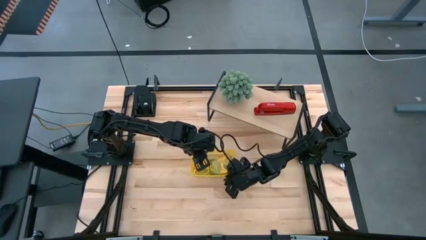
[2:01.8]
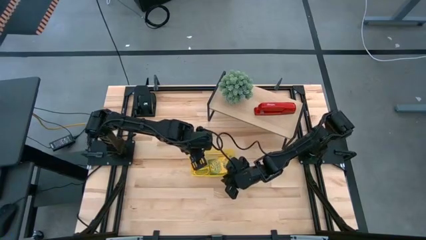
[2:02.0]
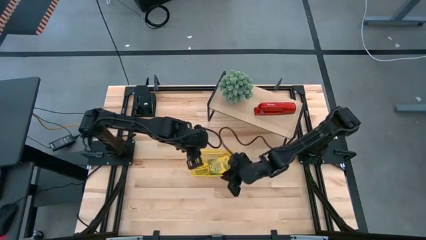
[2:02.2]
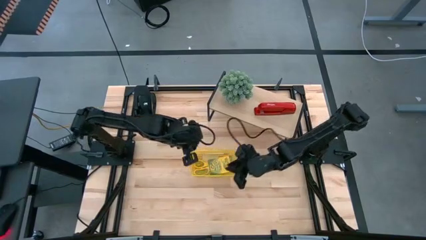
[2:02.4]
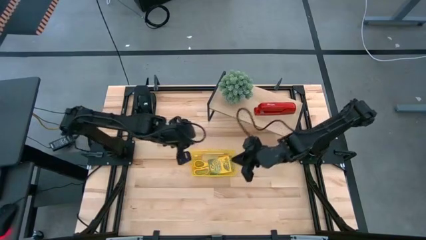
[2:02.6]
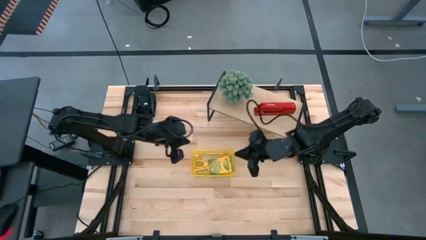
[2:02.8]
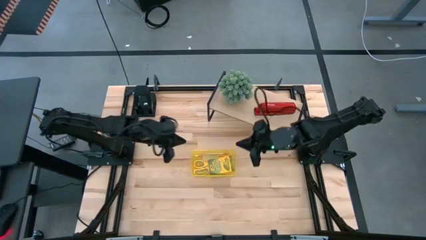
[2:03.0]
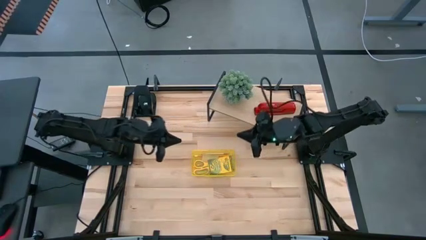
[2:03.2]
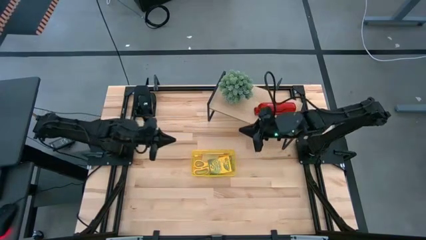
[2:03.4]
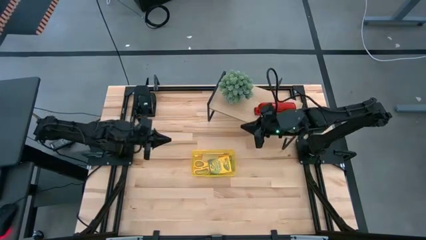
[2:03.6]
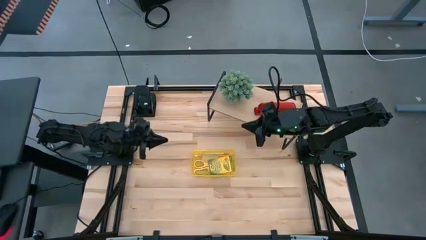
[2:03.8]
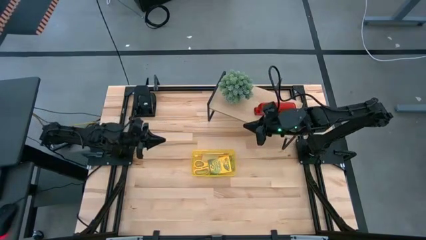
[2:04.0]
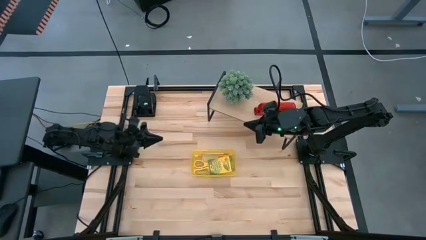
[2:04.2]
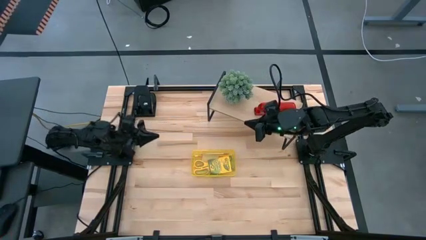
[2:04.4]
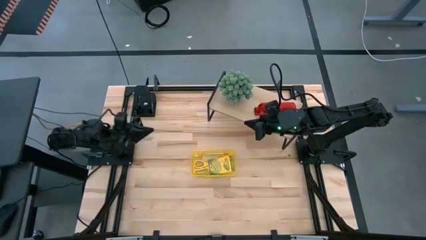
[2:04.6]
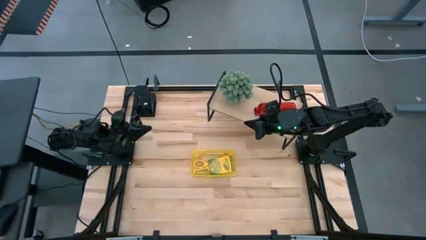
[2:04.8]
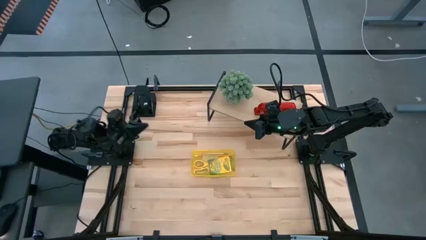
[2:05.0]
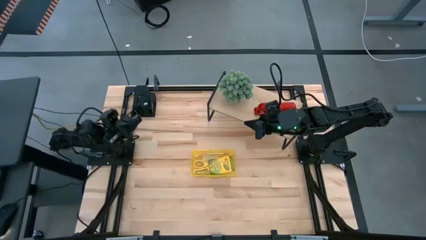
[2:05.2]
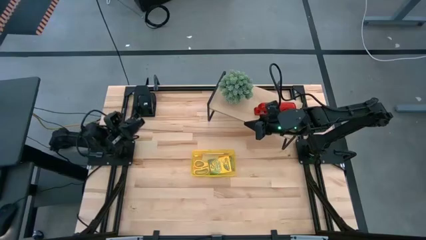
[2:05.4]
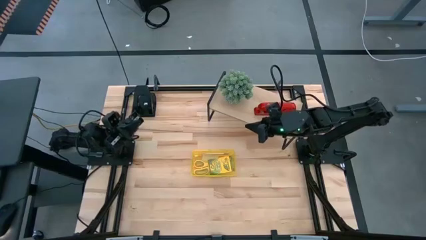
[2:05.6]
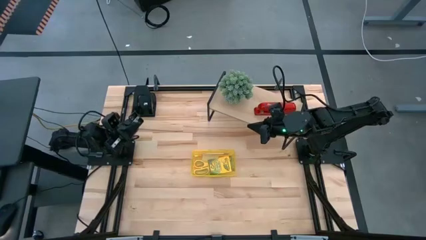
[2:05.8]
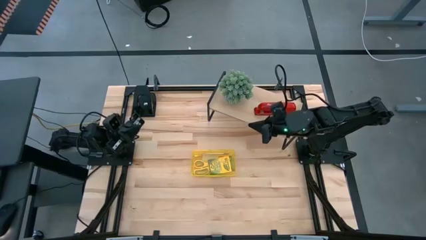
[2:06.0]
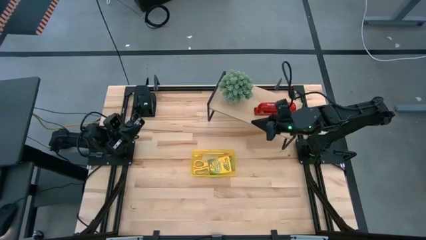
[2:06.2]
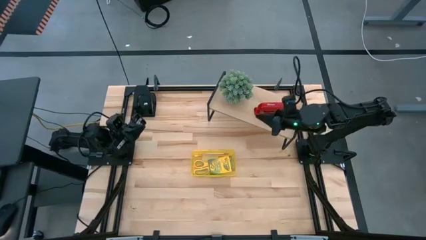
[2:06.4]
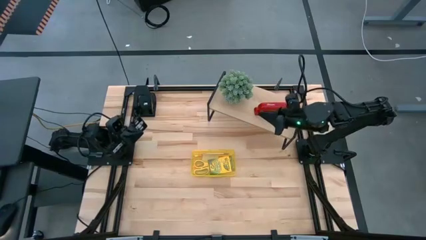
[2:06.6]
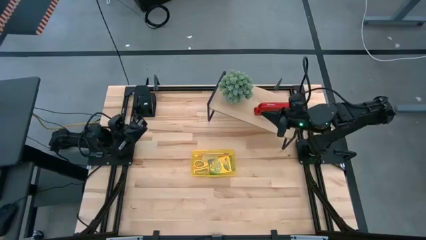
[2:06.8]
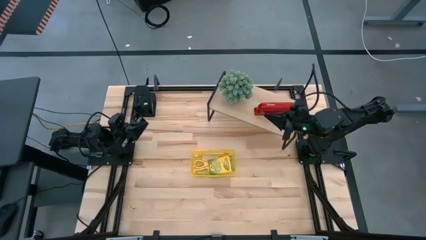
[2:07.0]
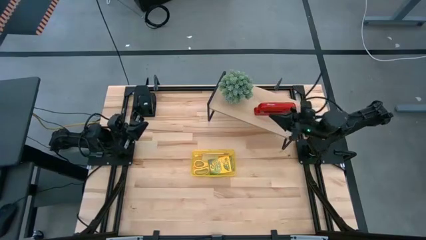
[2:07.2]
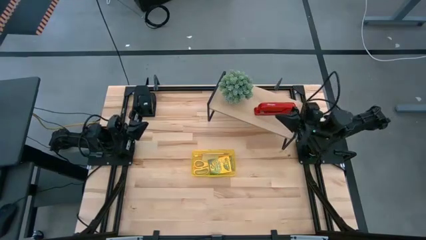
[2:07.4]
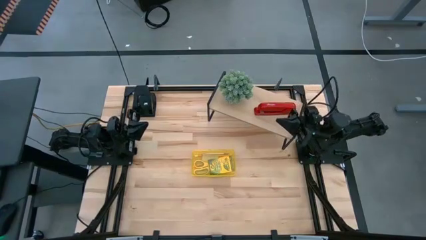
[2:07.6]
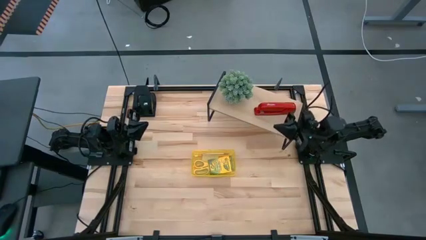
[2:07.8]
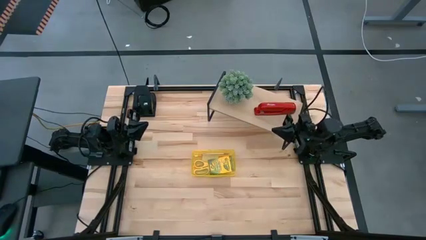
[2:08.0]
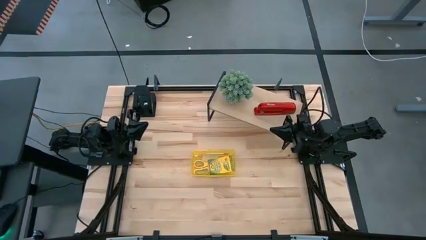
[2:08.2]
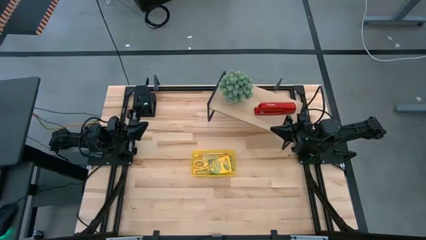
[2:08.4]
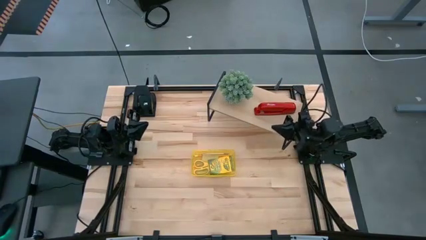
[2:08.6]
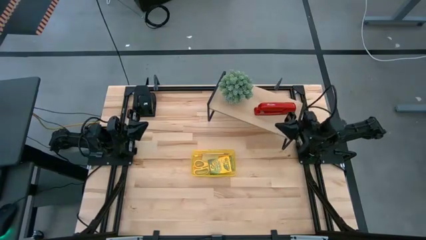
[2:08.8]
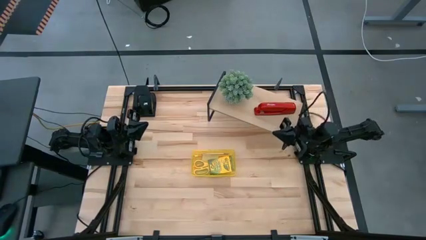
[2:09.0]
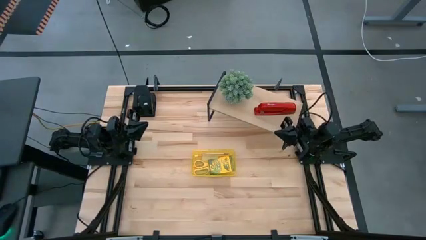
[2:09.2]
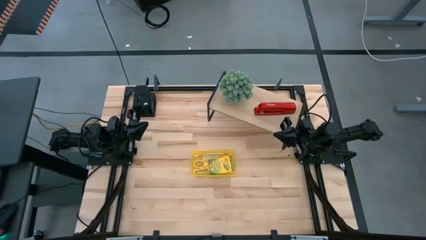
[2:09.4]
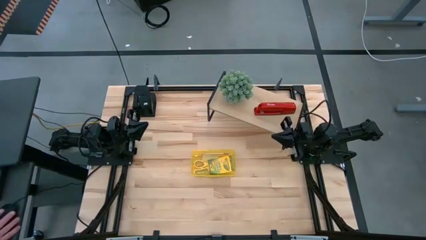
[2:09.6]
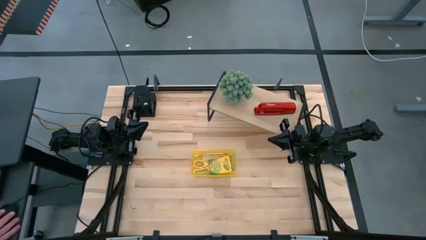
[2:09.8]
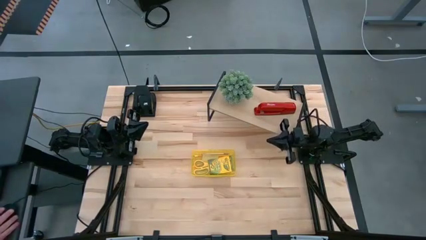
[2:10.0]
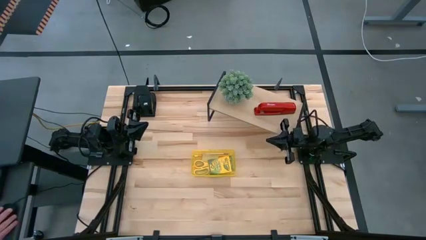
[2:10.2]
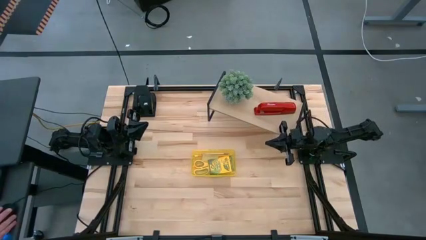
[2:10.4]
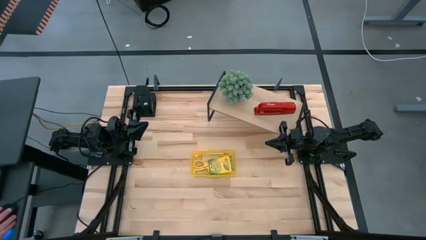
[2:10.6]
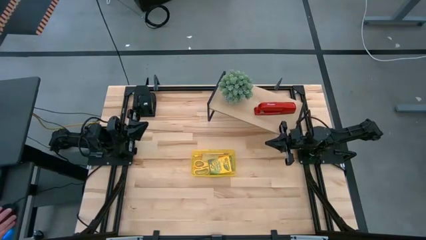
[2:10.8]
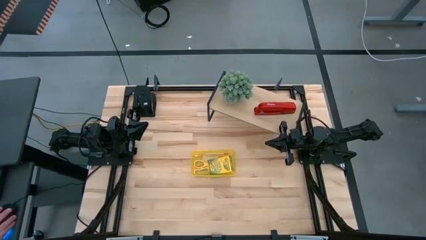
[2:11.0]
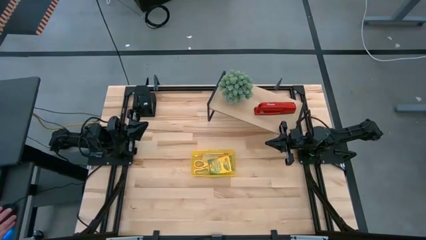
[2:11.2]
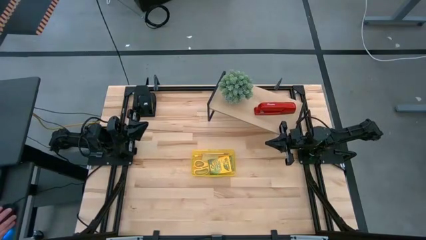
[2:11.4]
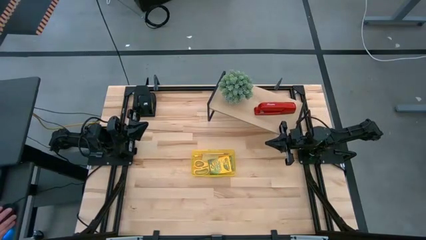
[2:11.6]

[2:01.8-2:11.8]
Task: Pack school essentials
Return to Home Position
